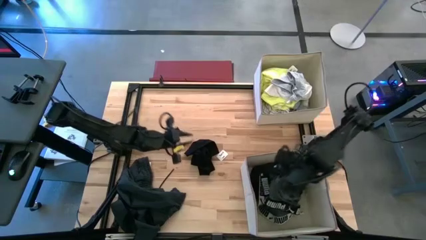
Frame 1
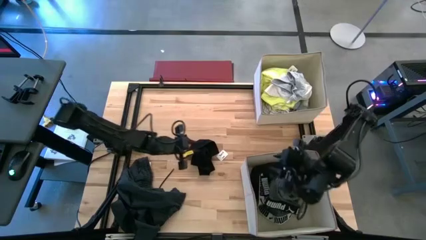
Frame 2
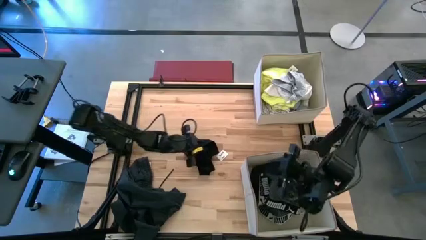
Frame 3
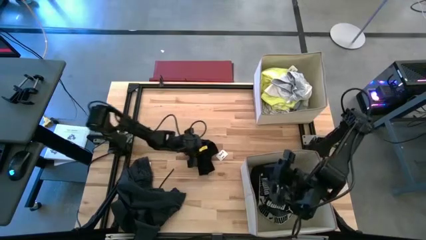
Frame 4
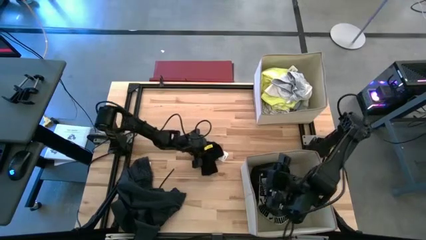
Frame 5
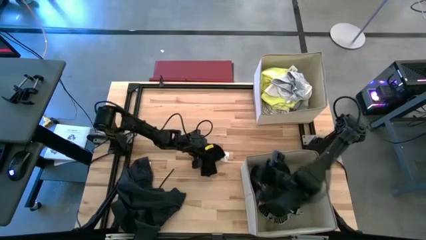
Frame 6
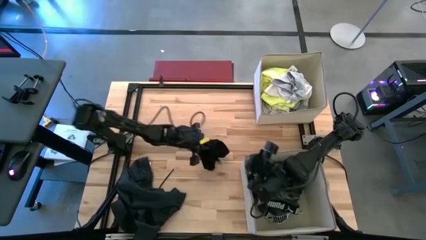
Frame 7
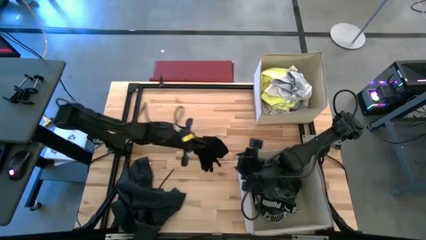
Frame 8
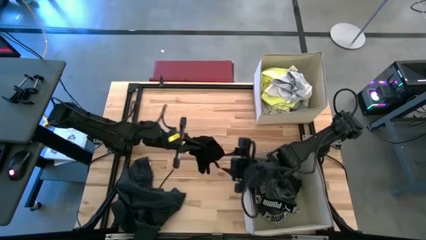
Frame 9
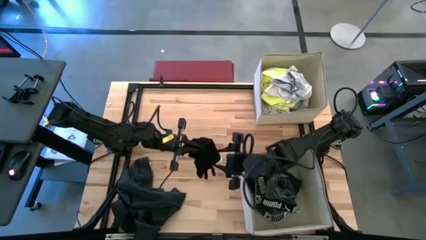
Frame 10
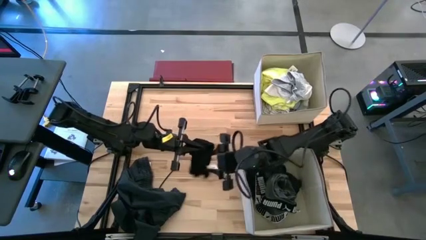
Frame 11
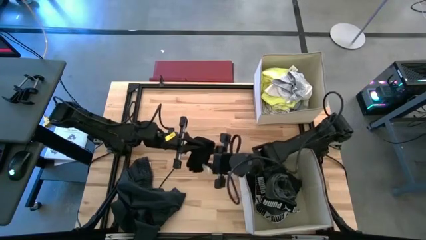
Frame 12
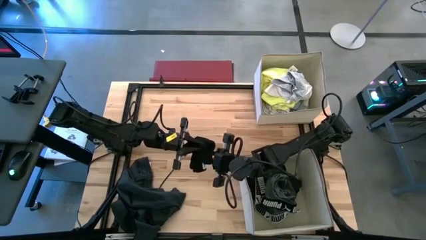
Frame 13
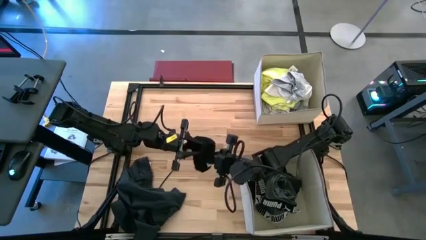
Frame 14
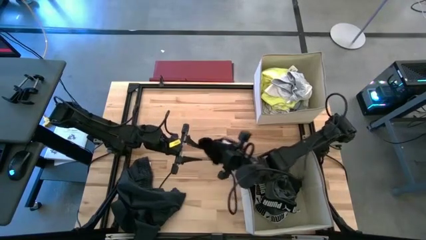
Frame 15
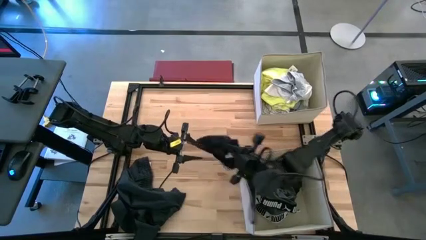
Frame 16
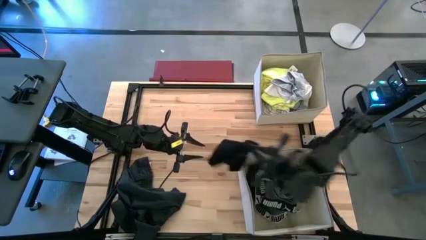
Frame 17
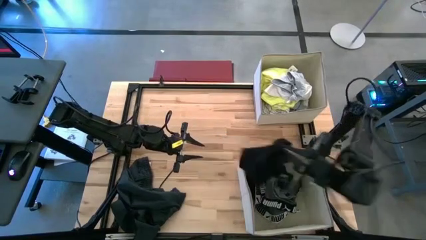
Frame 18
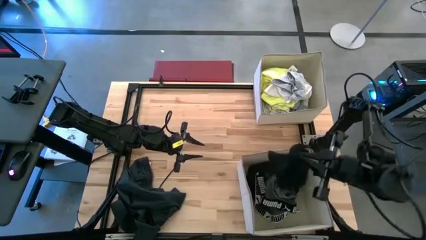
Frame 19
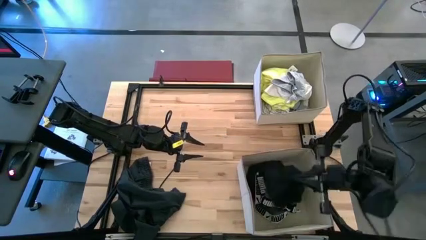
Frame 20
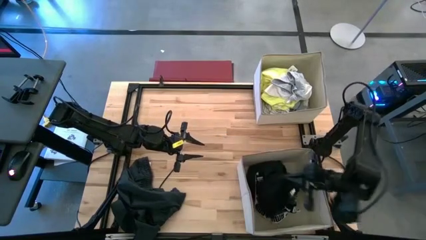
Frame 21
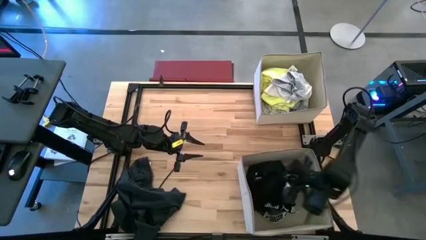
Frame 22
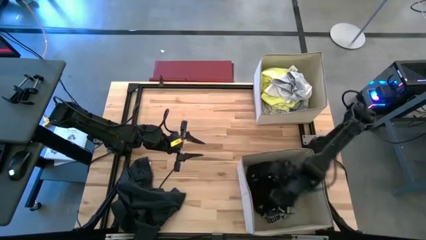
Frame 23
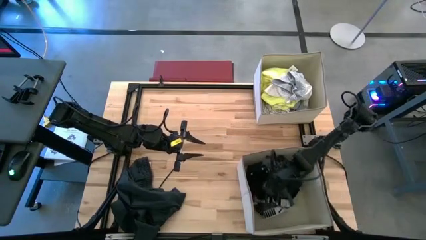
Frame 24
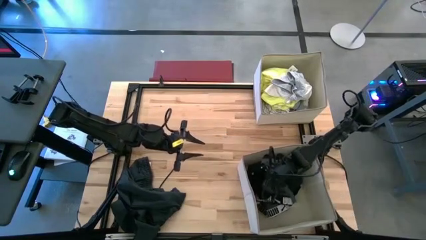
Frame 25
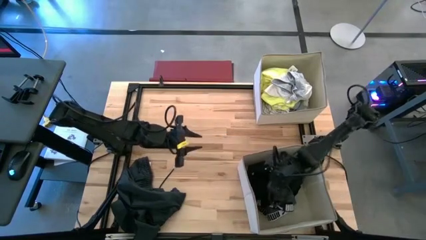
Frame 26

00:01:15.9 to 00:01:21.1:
Task: Sort clothes
Put the black shorts in the bottom white bin

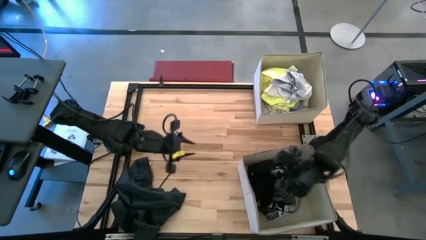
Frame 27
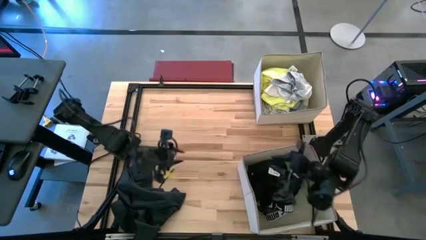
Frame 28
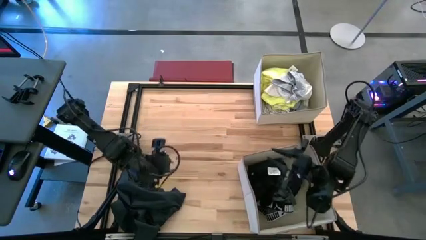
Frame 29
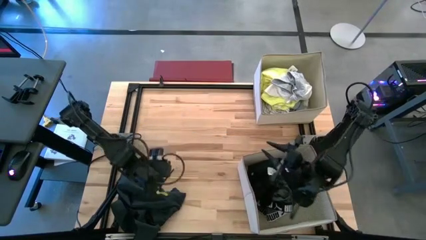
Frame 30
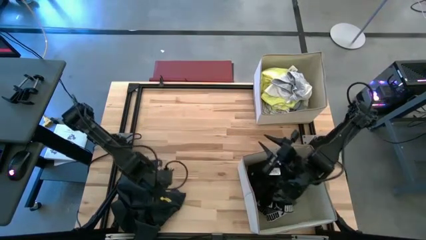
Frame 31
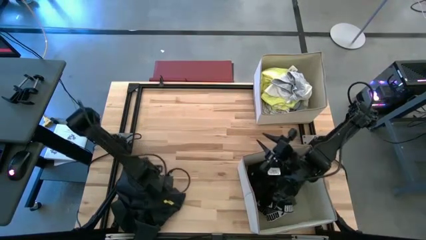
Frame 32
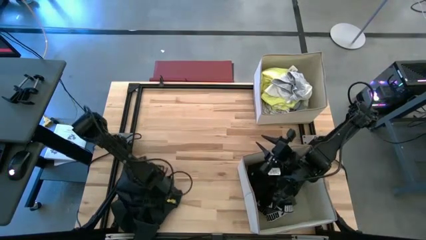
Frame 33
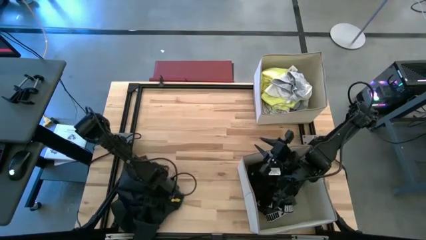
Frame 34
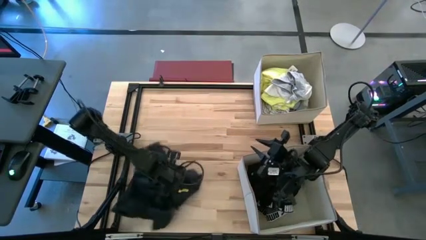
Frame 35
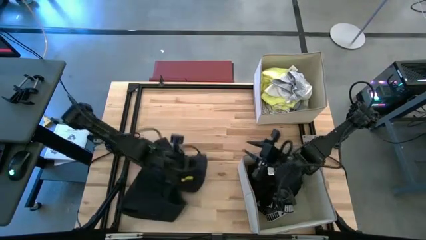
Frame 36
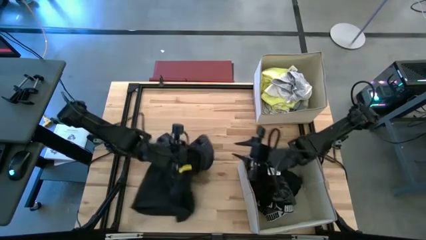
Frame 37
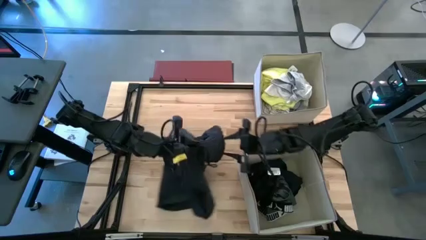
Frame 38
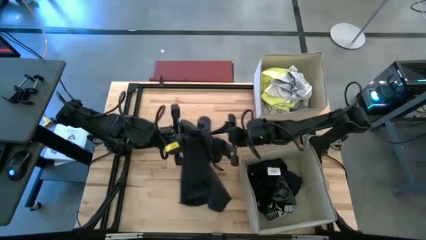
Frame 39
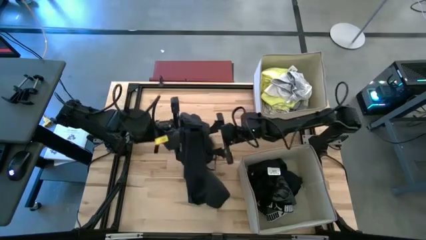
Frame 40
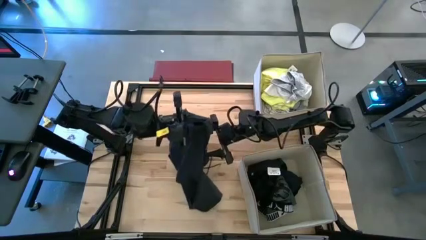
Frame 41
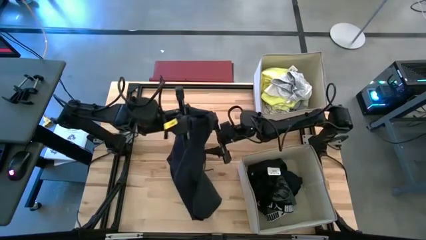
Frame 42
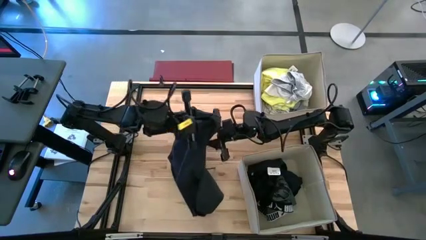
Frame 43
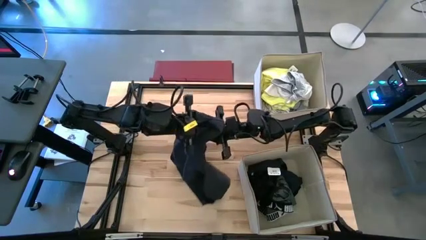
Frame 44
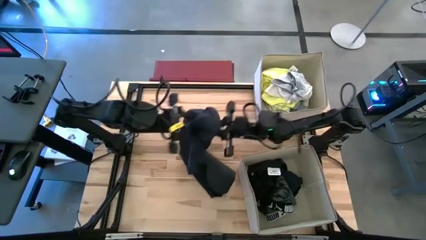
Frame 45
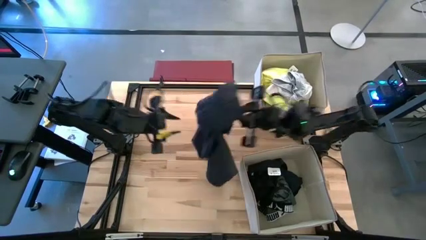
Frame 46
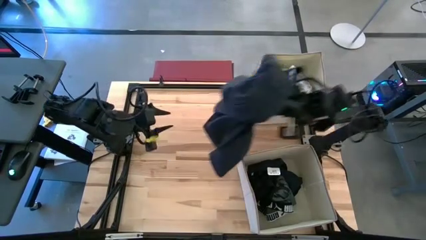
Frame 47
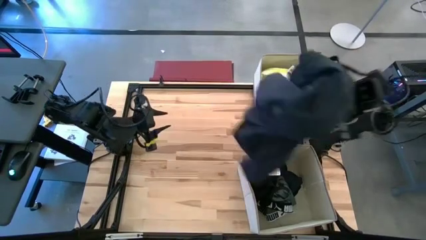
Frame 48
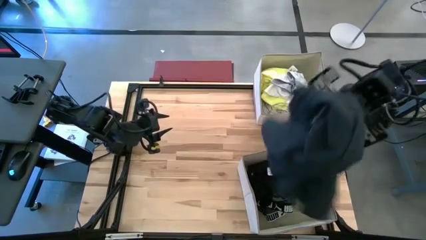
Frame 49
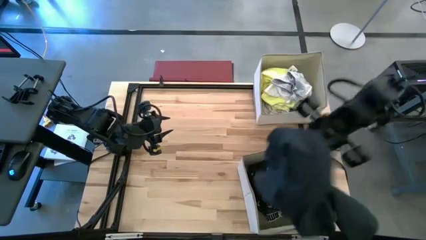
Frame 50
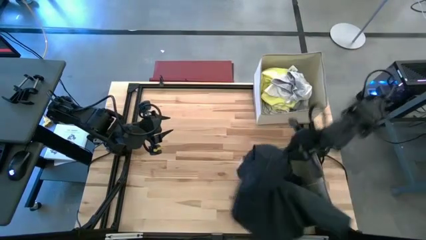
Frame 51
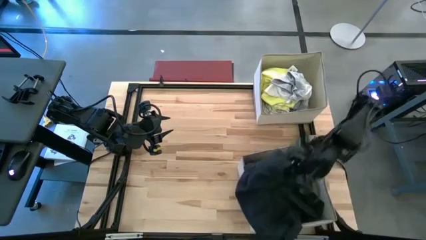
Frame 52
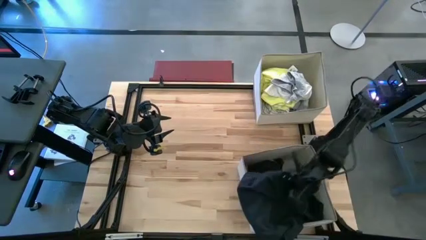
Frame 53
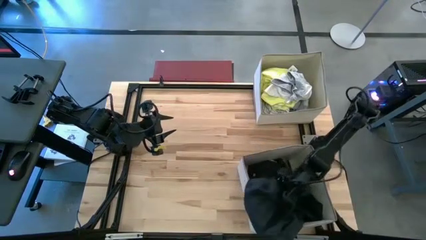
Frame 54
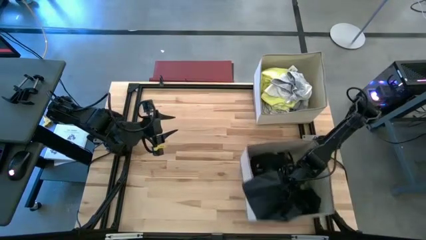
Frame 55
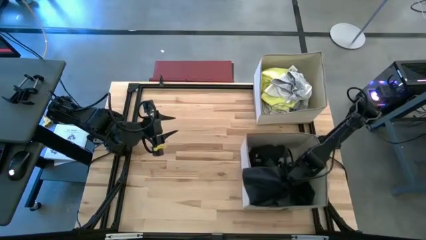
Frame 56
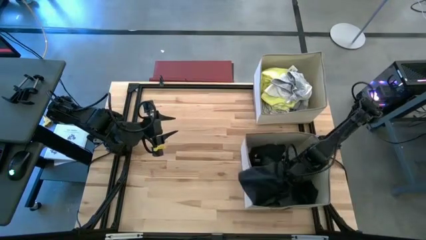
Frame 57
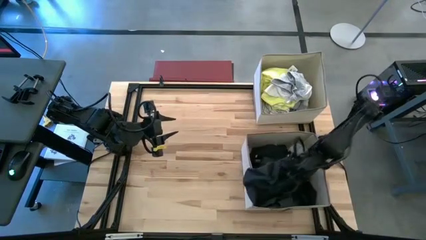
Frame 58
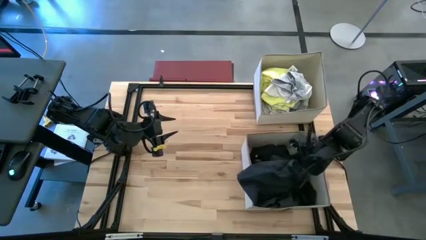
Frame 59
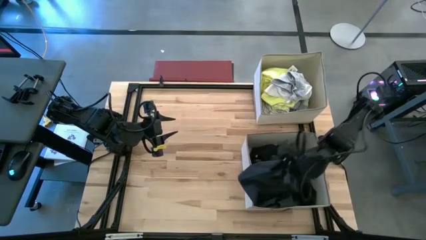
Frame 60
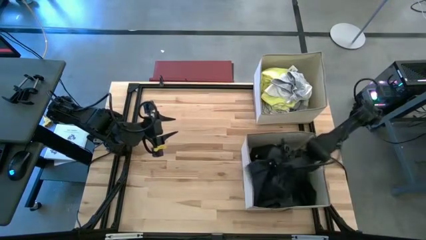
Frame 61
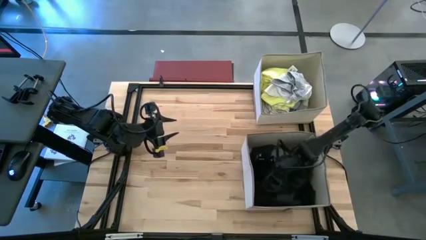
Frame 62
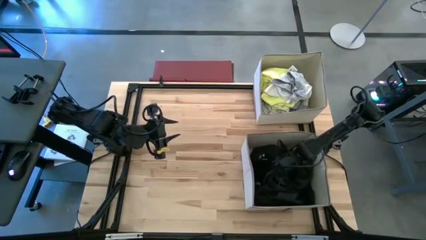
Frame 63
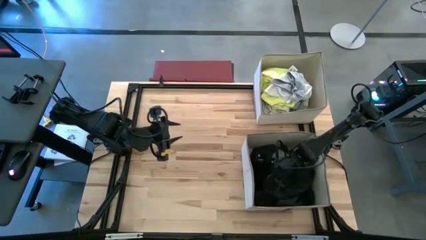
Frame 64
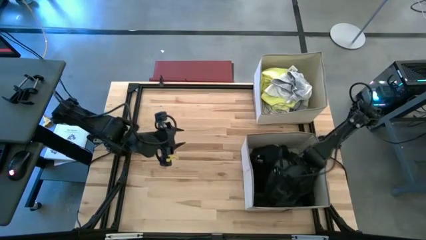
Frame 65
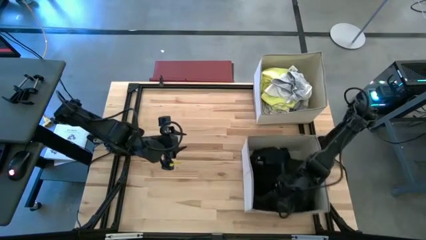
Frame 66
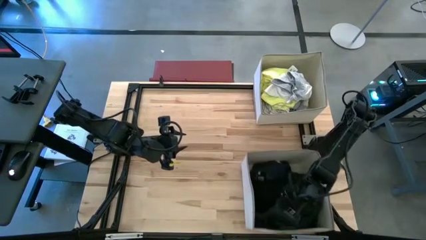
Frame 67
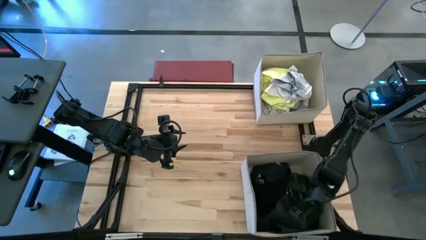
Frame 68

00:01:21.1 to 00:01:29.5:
Put the black shorts in the bottom white bin

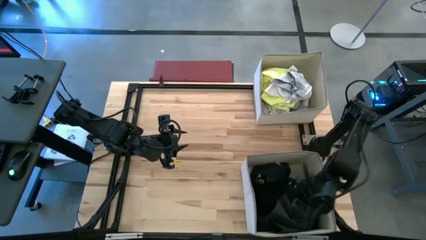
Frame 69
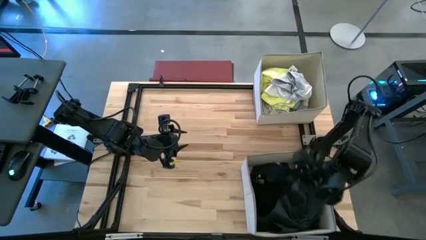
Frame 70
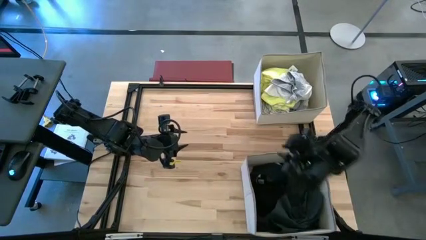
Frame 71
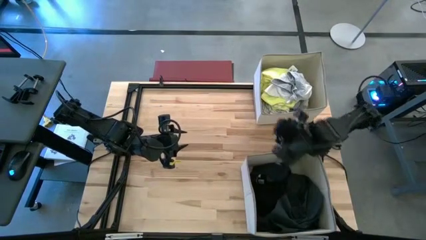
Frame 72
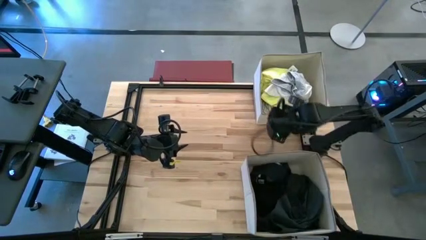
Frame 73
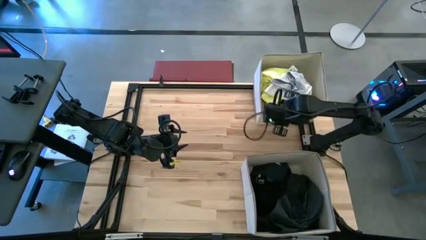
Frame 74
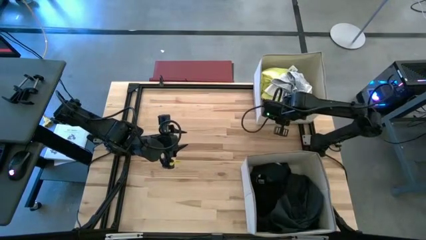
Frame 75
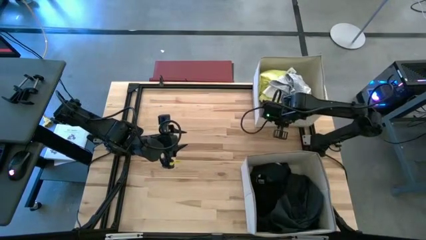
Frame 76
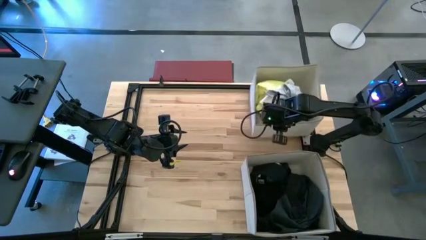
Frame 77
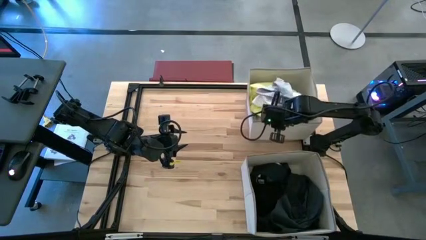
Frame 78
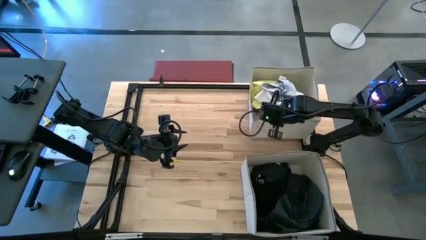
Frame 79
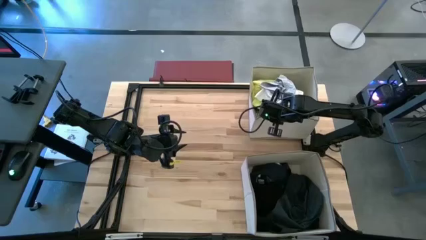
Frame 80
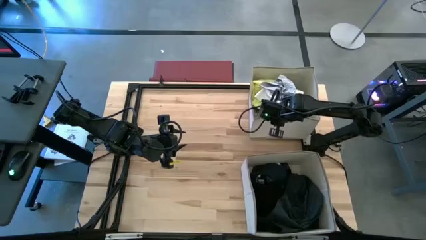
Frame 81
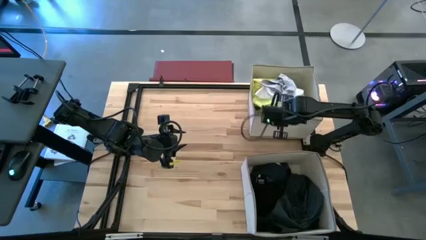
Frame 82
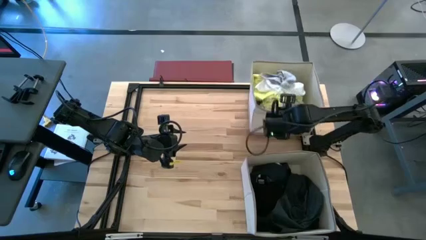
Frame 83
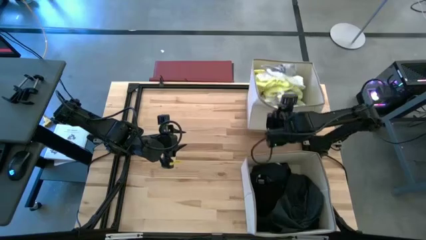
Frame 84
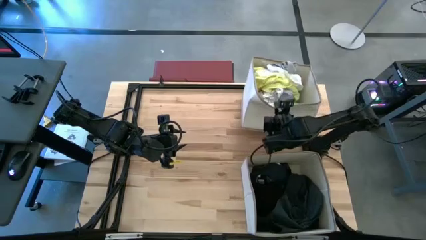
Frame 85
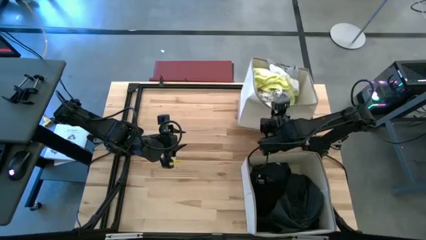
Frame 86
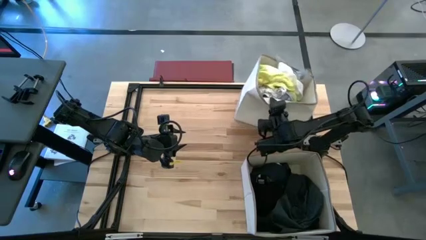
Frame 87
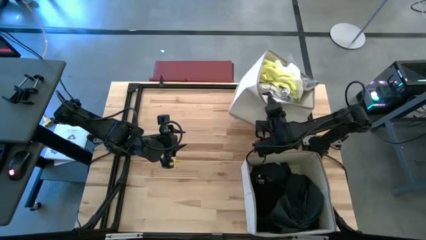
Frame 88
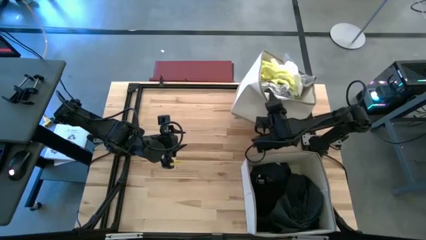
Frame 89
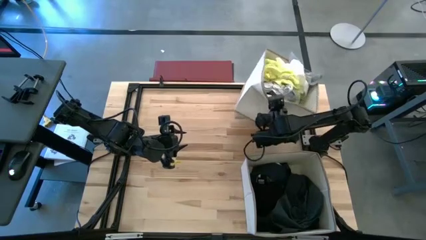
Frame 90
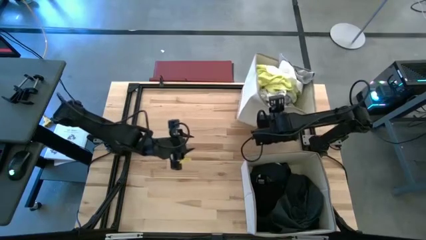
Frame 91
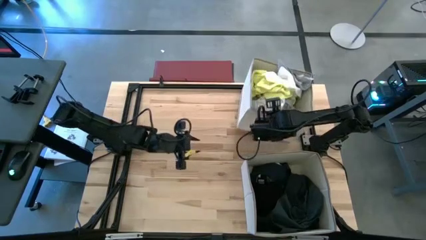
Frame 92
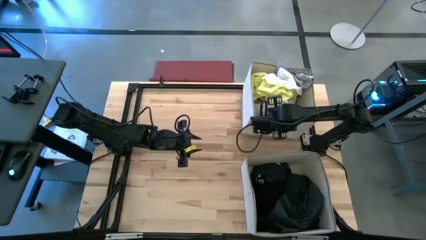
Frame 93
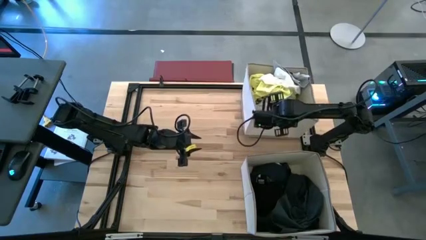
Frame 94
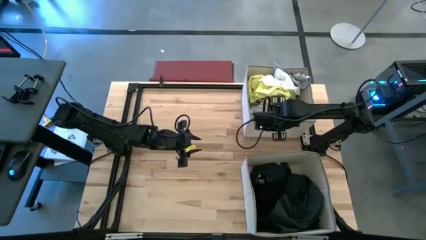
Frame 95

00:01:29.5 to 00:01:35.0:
Adjust the top white bin
